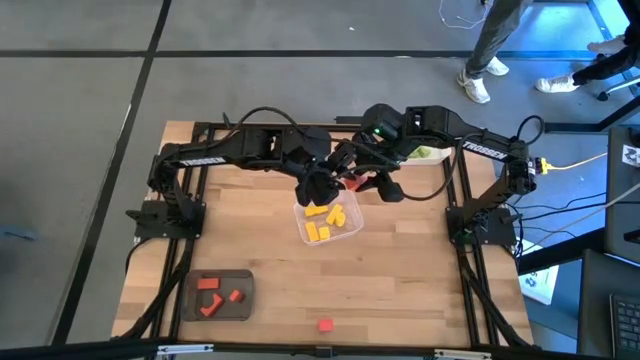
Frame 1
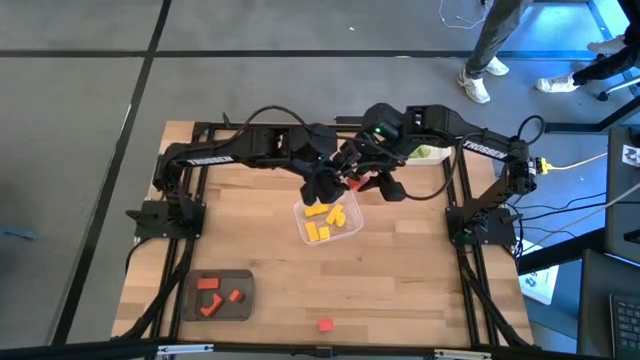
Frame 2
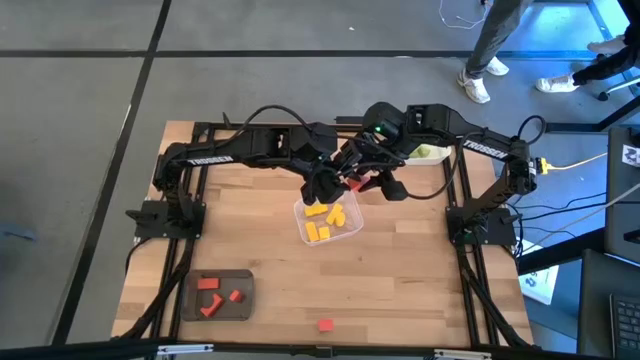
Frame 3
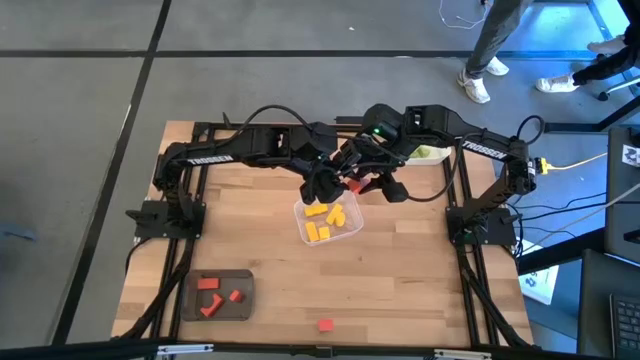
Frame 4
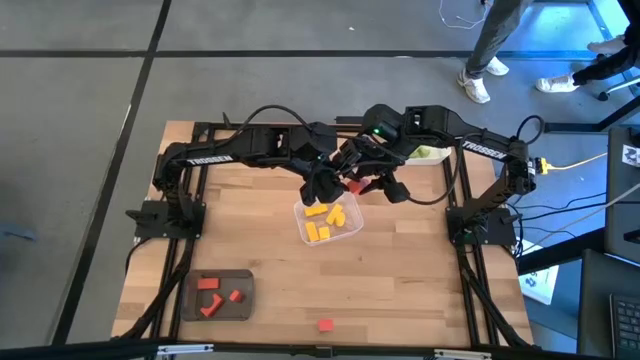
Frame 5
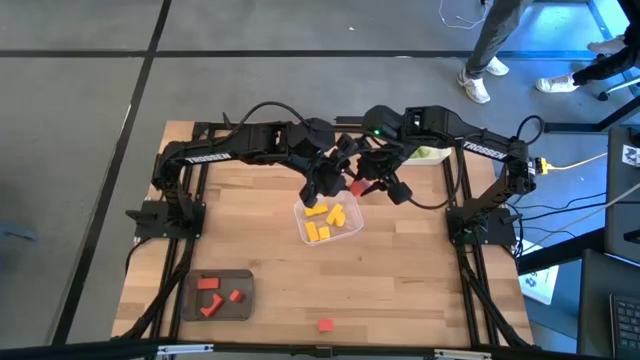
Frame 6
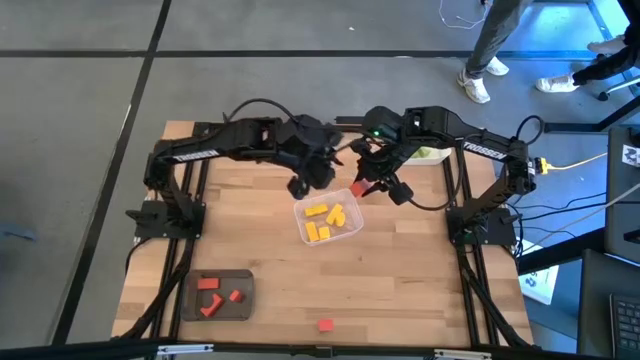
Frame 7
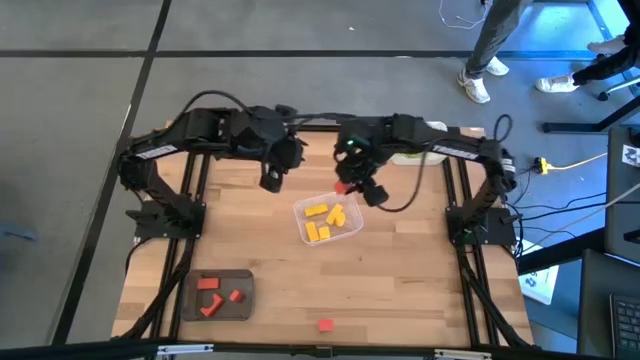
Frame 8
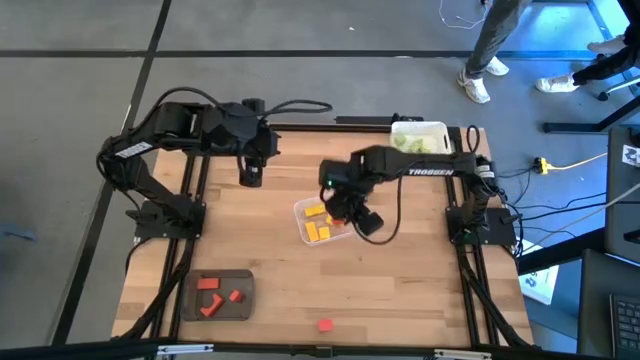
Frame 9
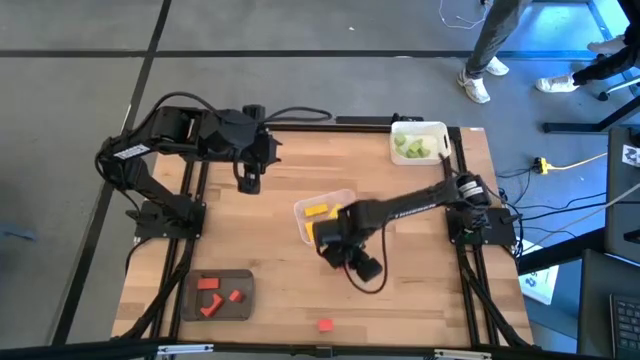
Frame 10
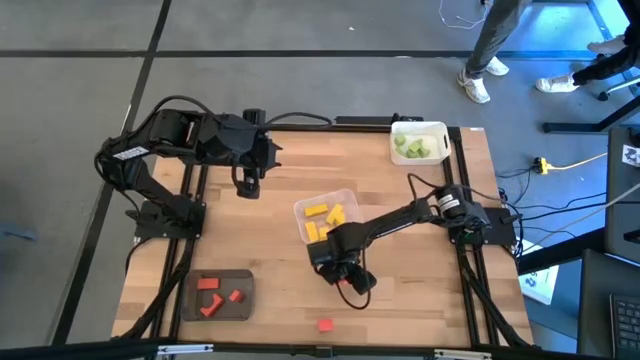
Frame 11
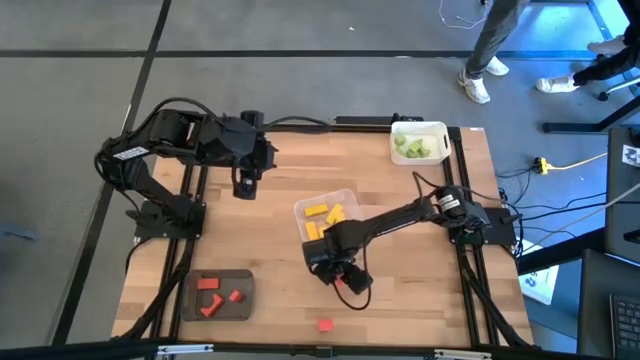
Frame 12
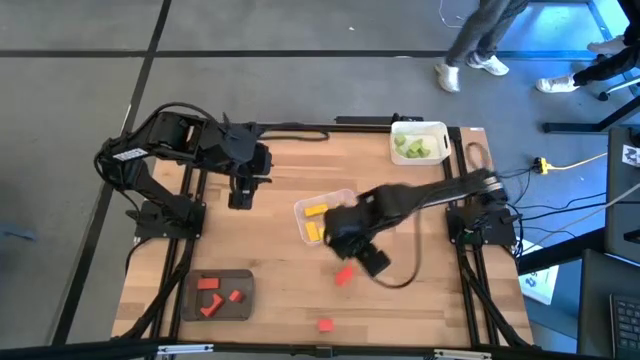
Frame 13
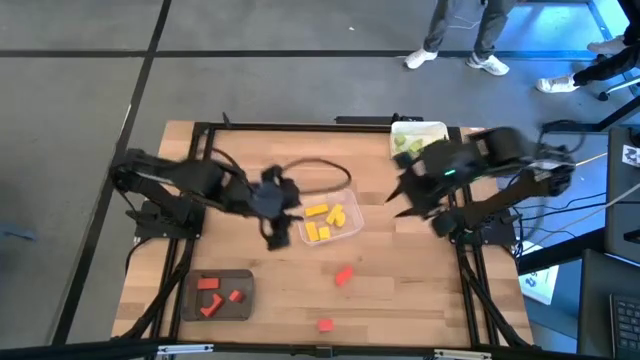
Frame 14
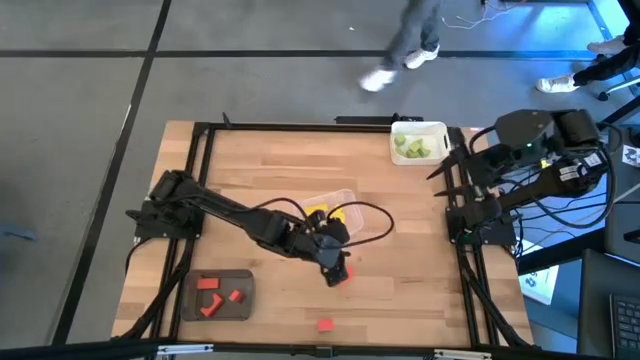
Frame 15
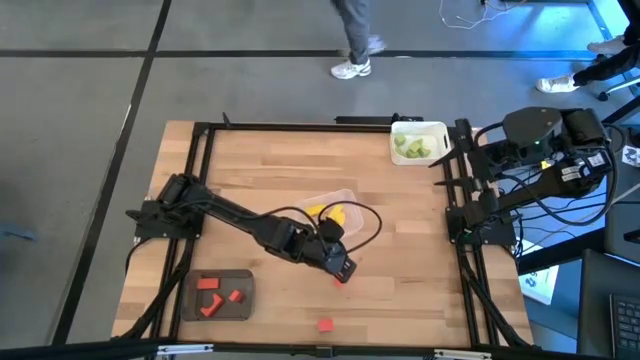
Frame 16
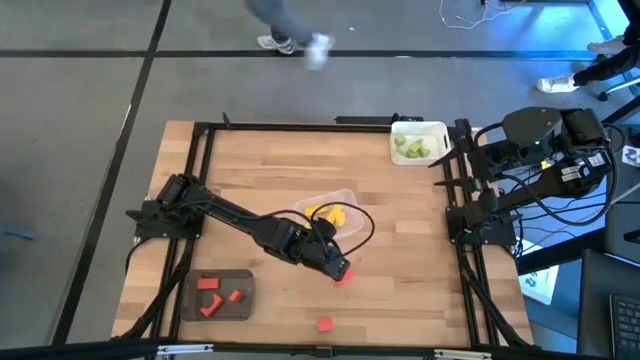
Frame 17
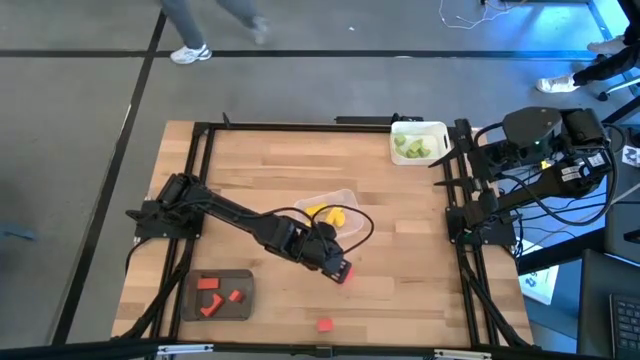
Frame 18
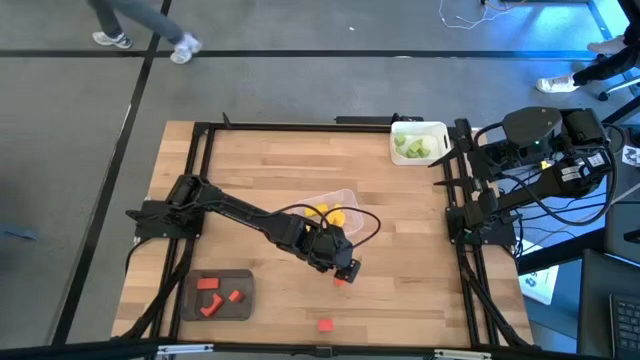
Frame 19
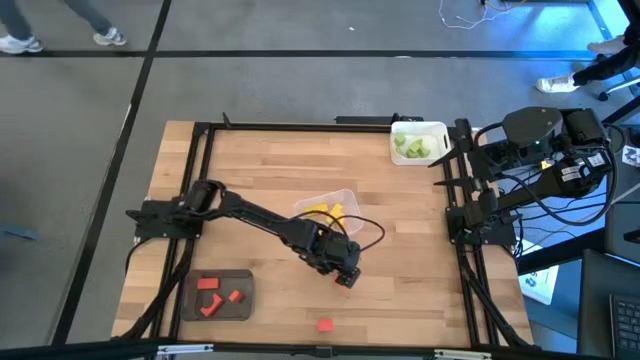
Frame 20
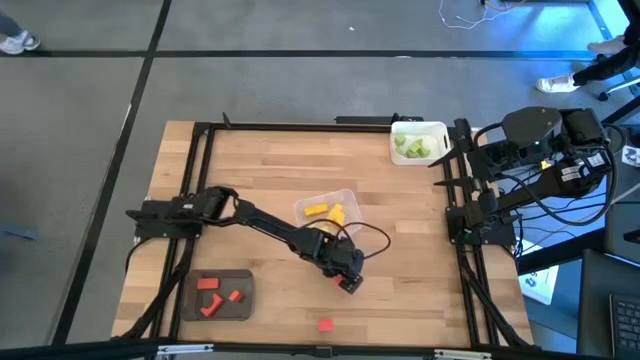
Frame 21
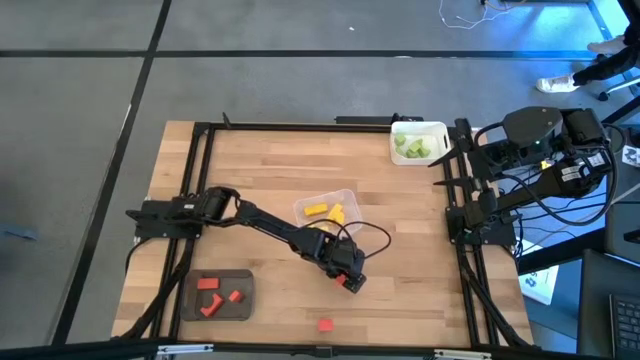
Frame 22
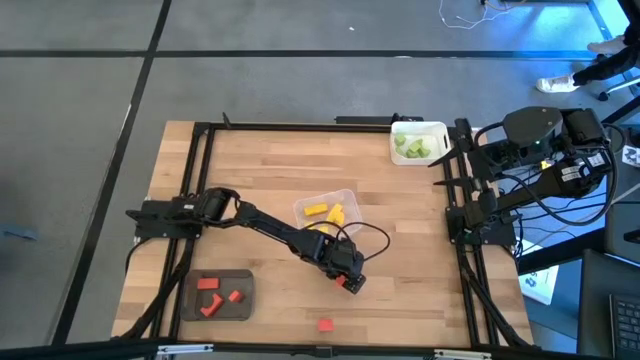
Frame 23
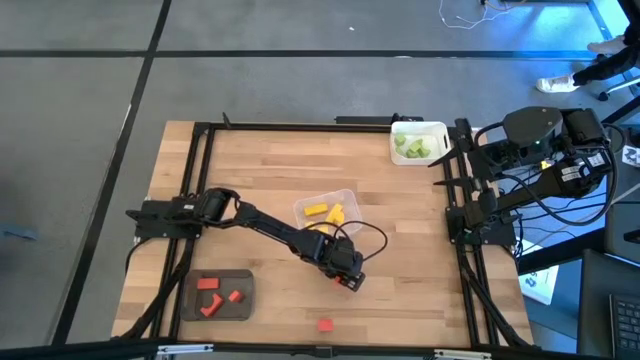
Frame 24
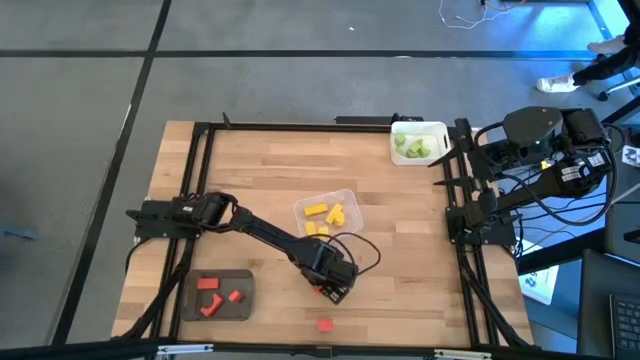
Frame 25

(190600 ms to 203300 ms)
Task: Sort & place blocks by color
Put the orange block into the black bin

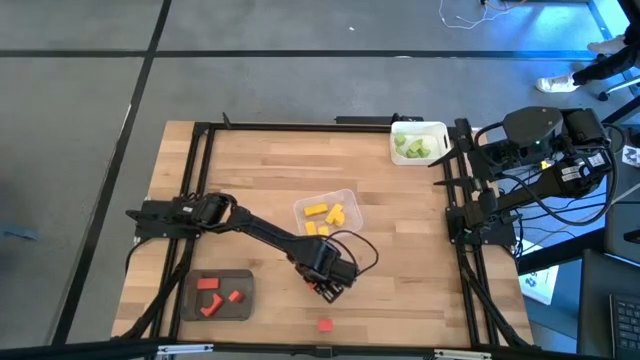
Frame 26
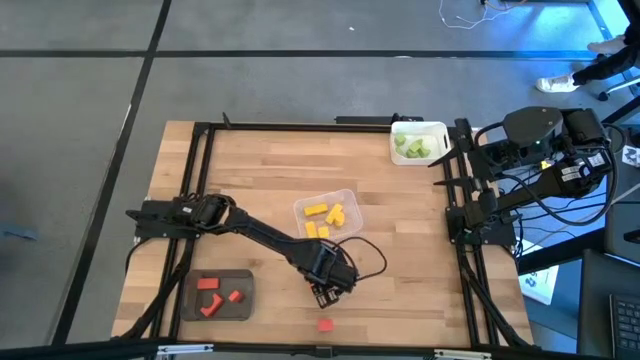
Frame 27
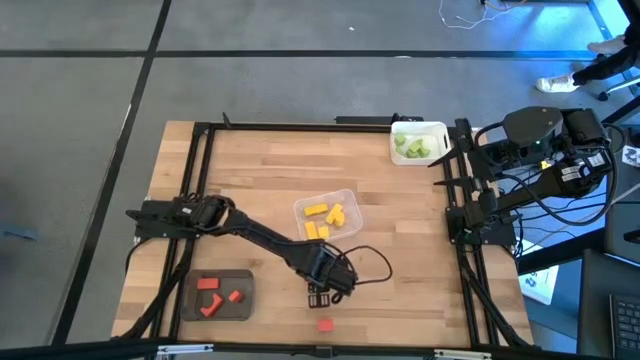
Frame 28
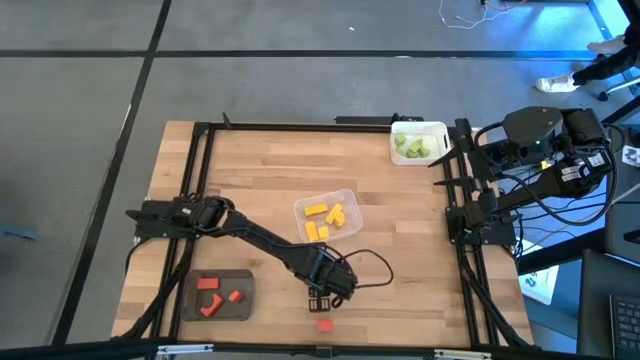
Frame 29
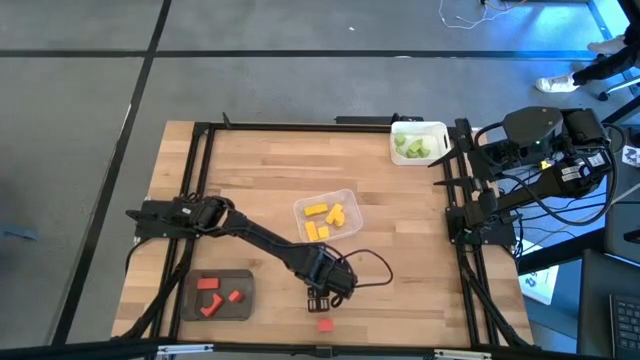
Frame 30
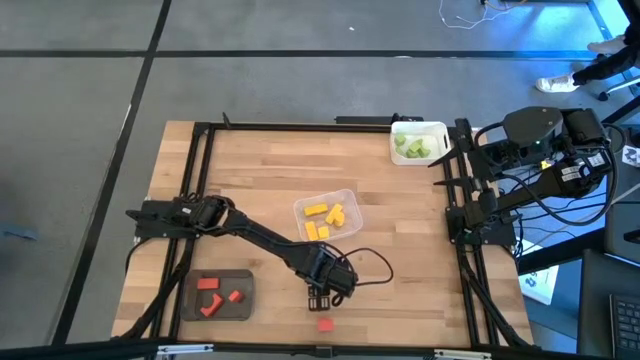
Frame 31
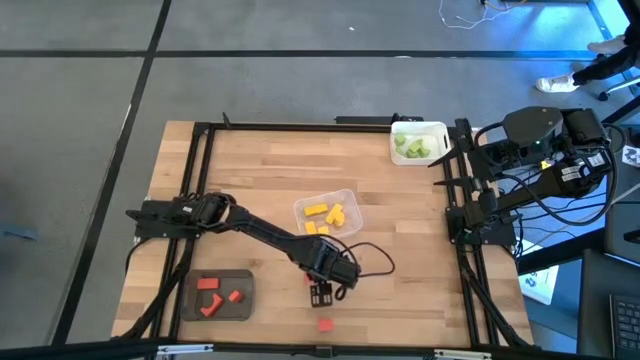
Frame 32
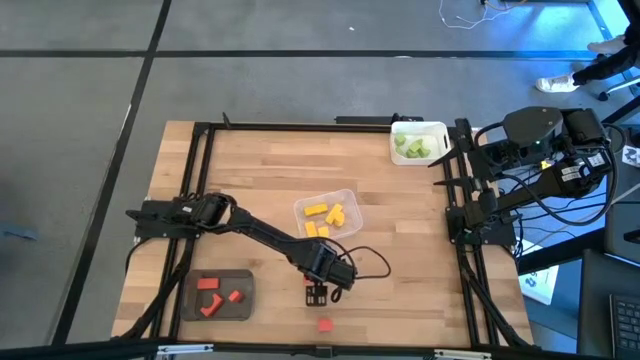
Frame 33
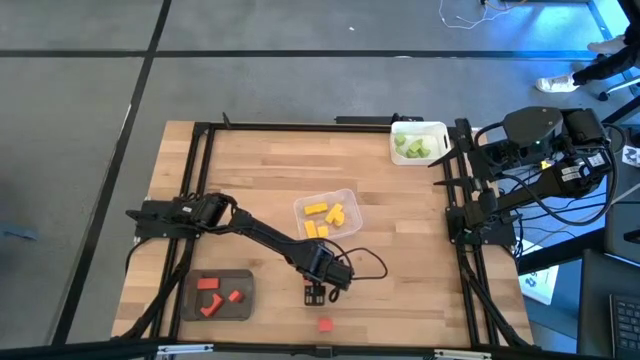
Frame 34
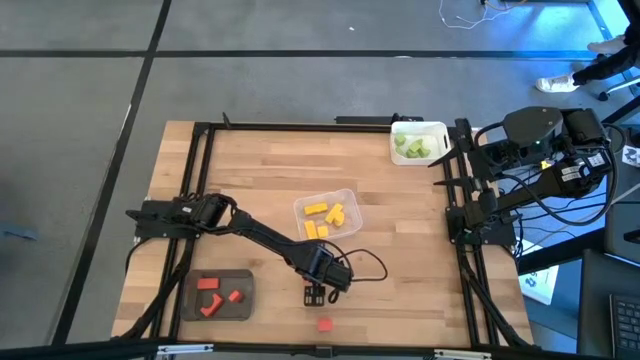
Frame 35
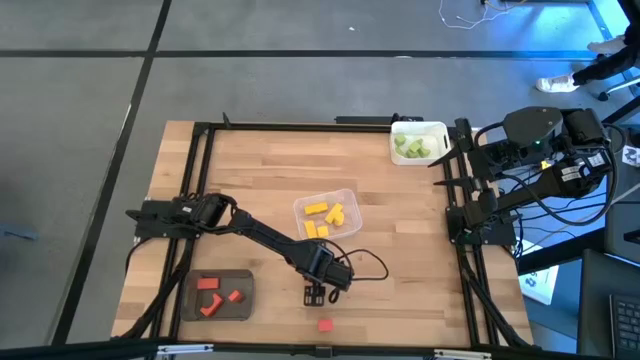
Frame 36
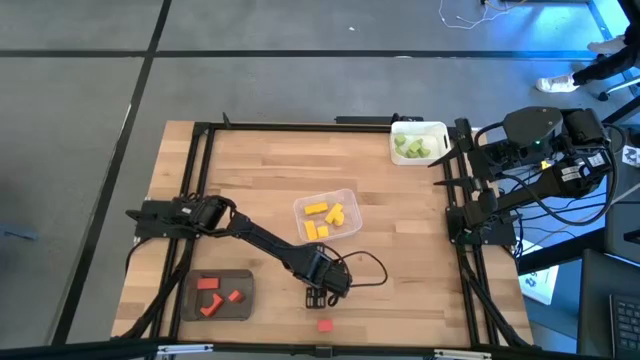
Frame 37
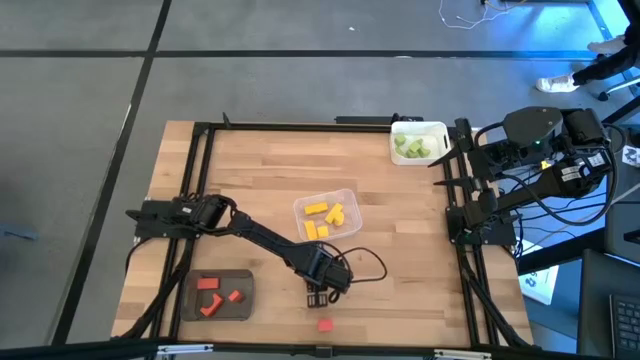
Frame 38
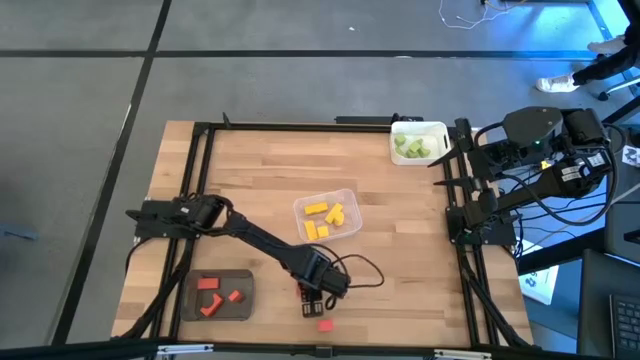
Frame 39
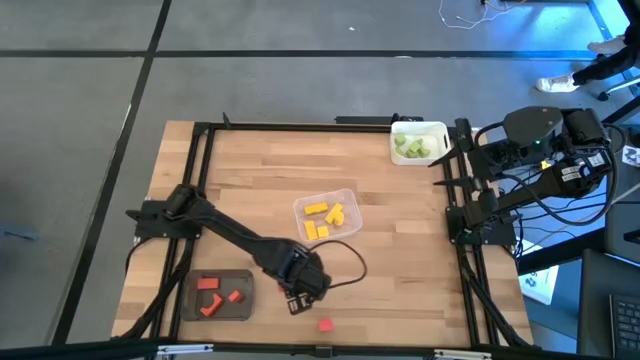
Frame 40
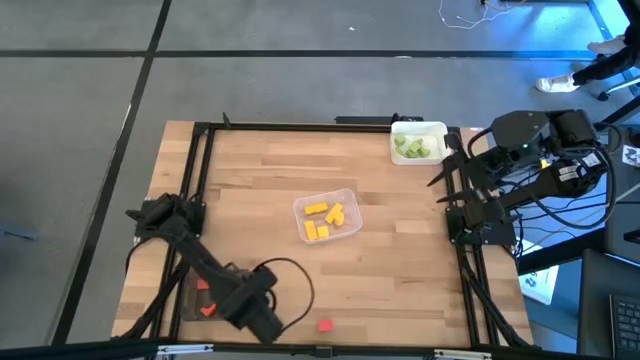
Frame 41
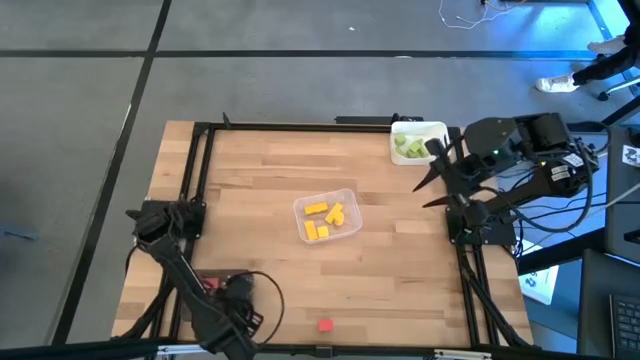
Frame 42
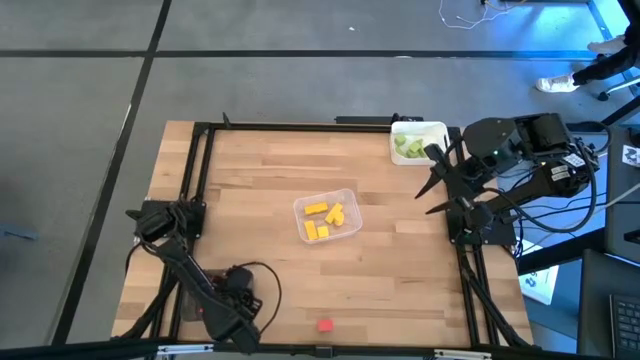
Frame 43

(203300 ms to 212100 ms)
Put the orange block into the black bin
